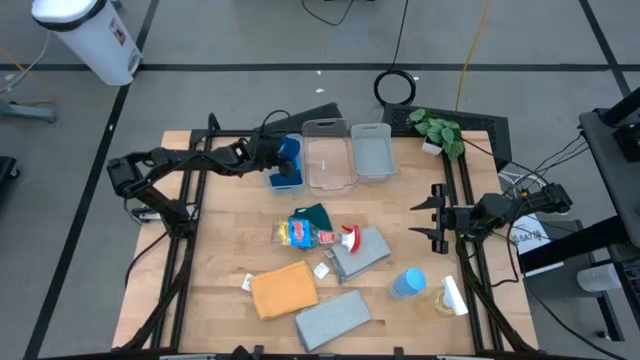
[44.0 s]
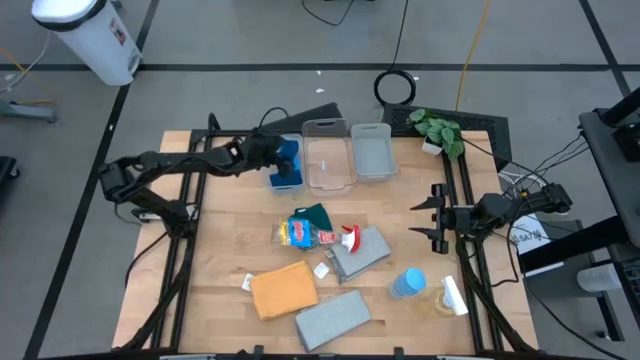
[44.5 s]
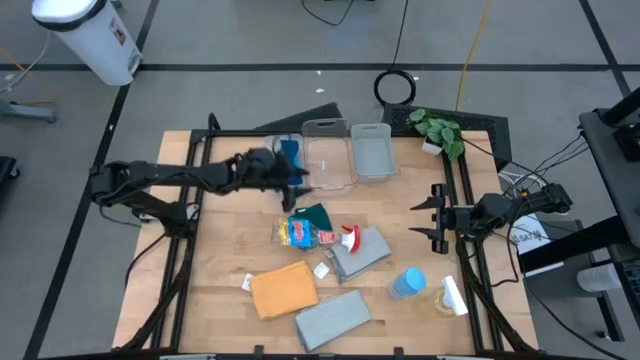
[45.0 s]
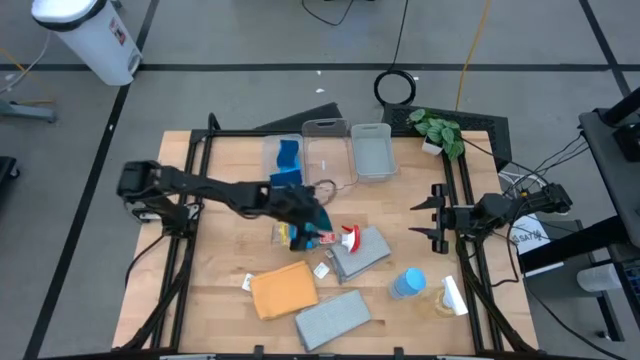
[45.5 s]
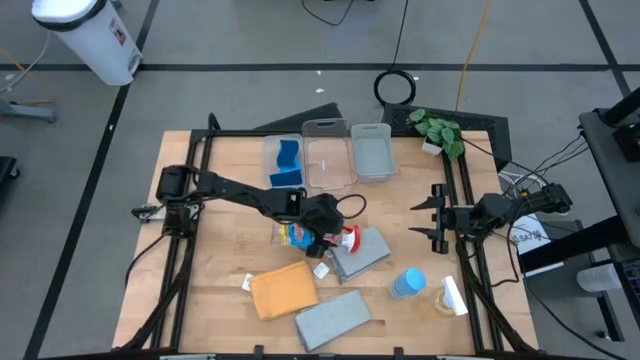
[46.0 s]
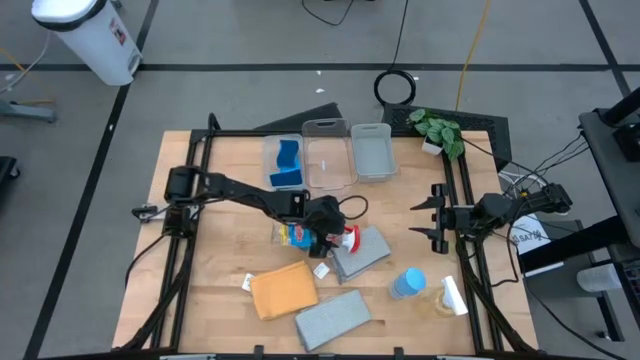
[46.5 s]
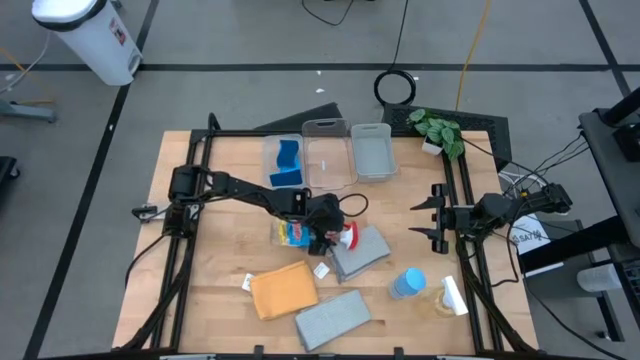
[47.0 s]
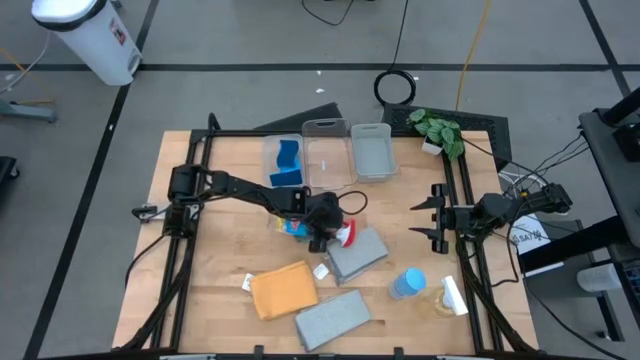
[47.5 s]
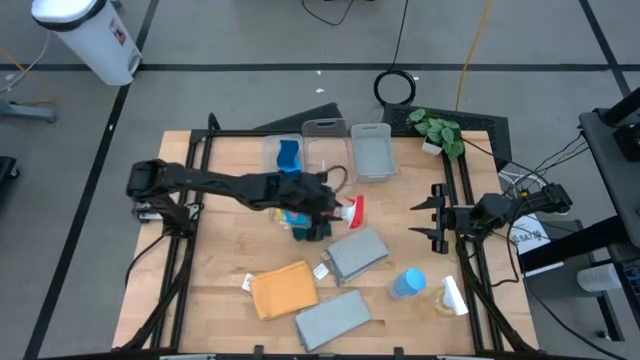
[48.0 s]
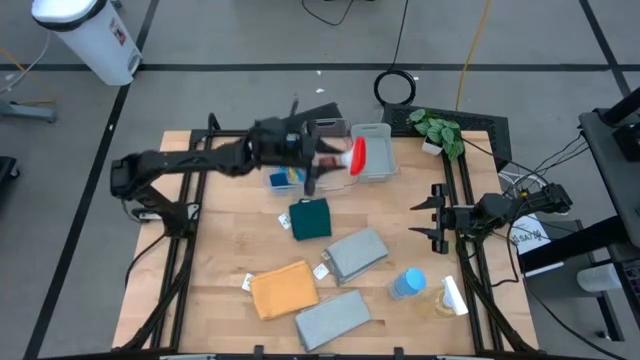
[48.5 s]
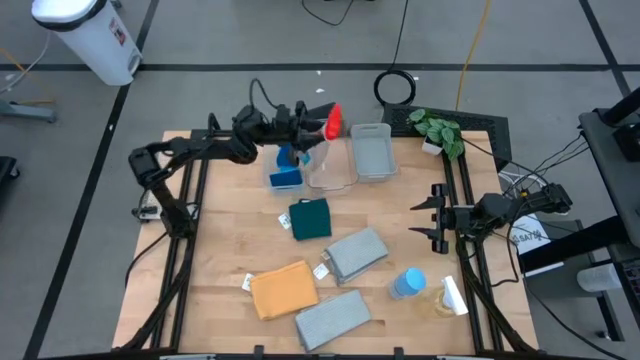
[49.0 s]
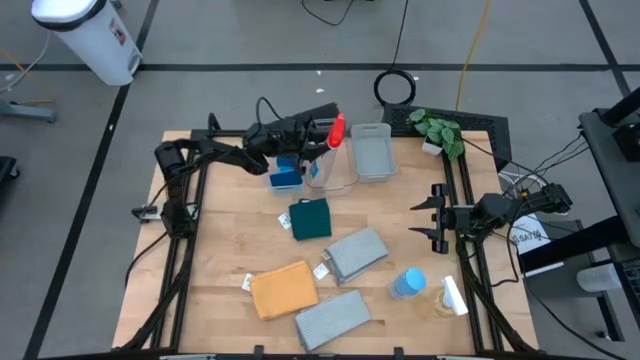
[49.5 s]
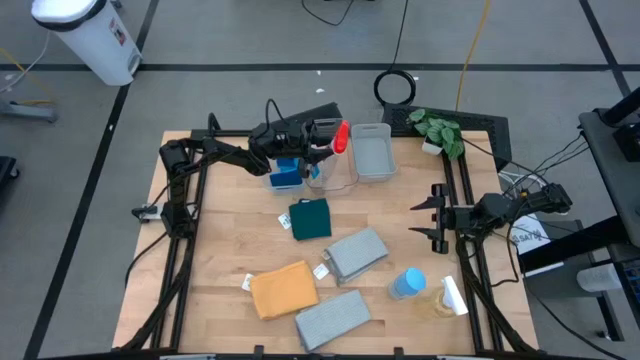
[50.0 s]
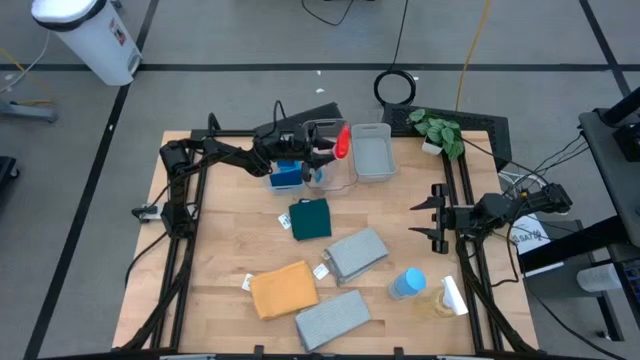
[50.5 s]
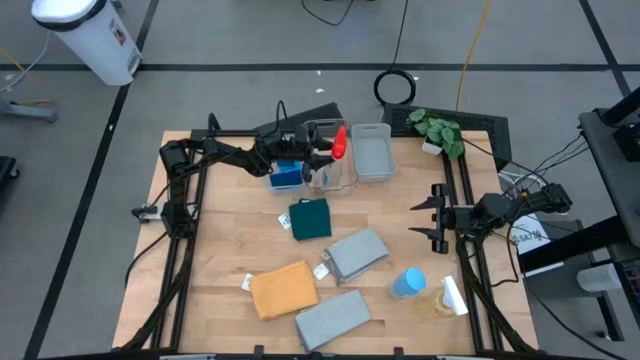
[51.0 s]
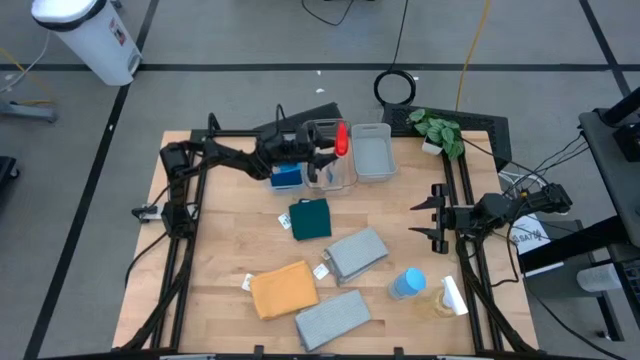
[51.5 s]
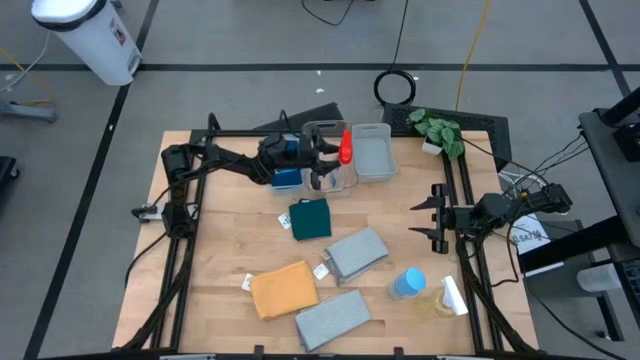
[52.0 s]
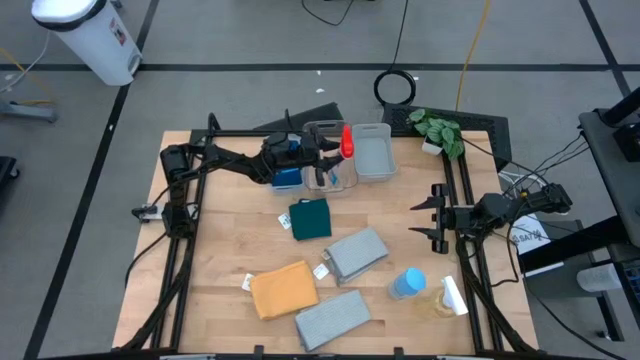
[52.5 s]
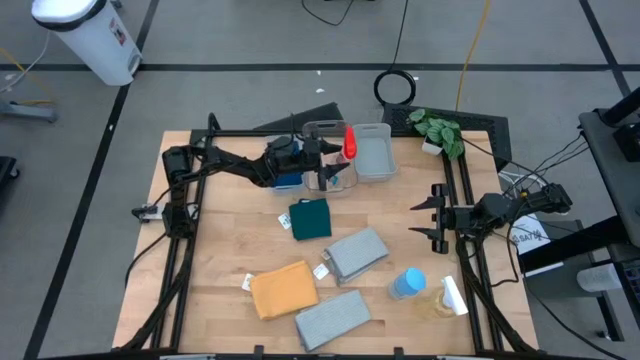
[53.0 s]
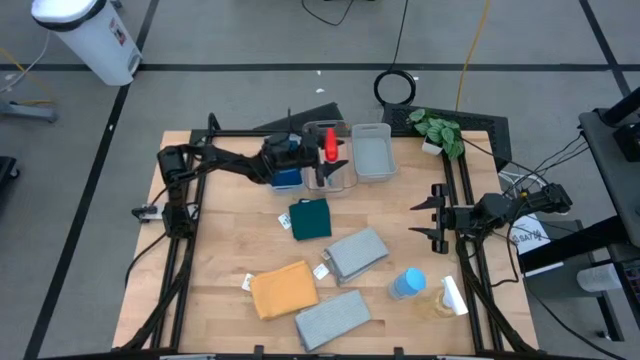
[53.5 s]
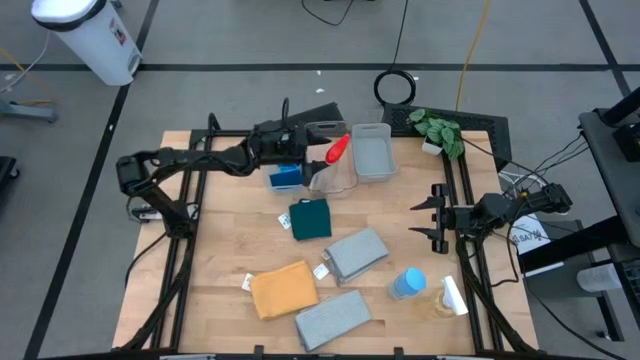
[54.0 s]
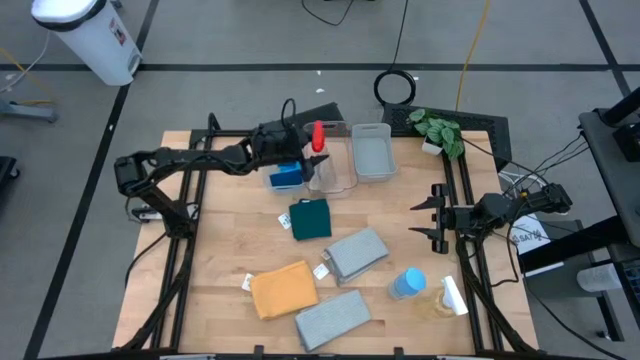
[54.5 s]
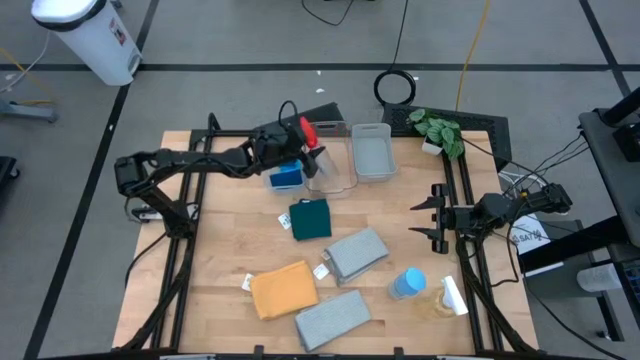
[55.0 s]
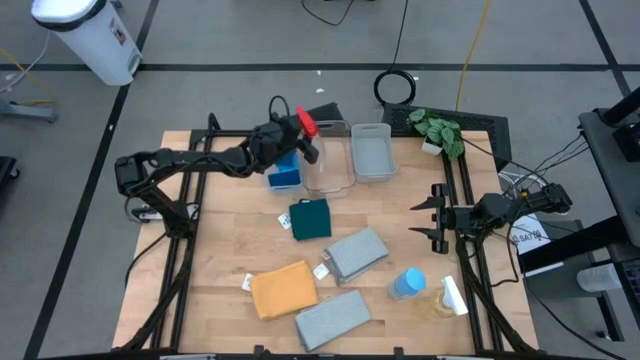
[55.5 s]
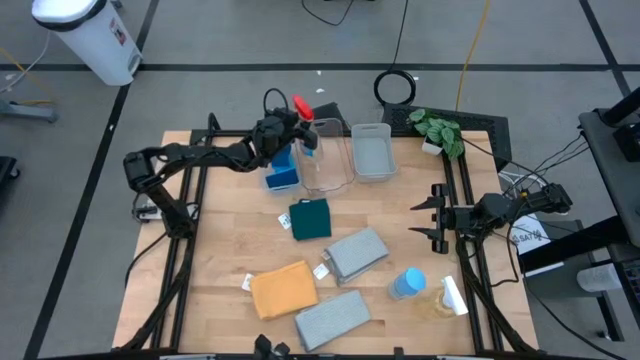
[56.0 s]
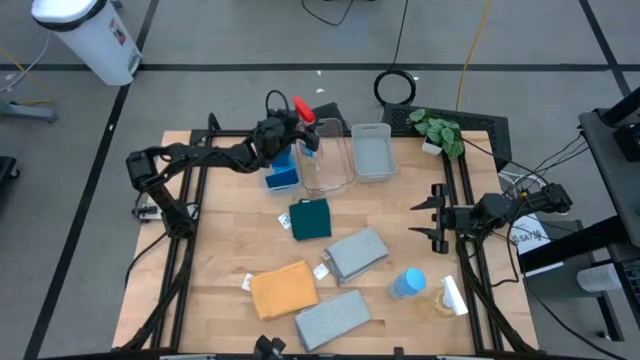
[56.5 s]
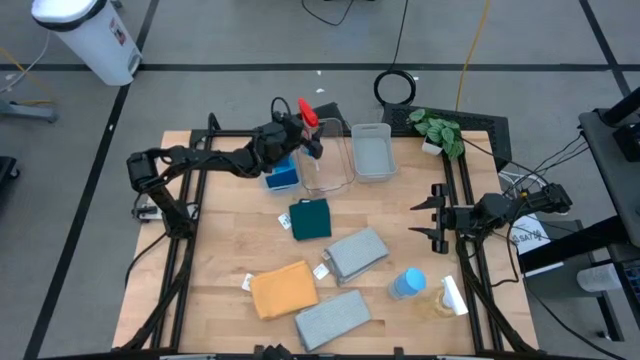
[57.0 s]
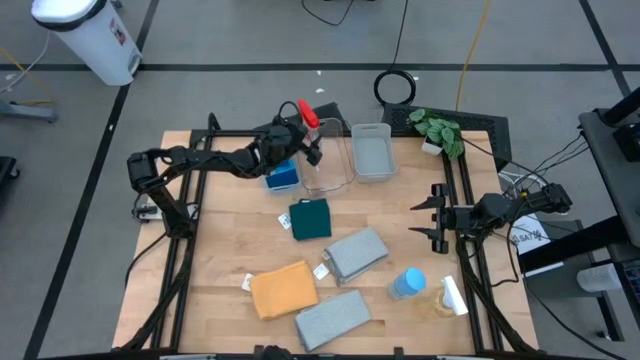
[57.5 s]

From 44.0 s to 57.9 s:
Task: Pick & Place Kitchen Items
Put the red disinfectant spray bottle into the transparent bin

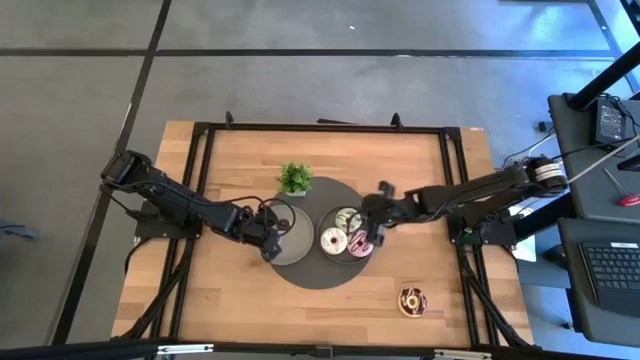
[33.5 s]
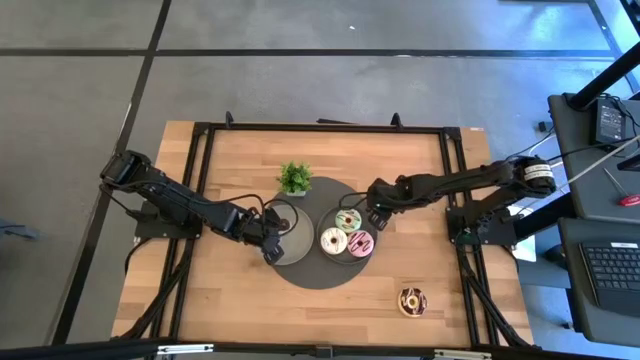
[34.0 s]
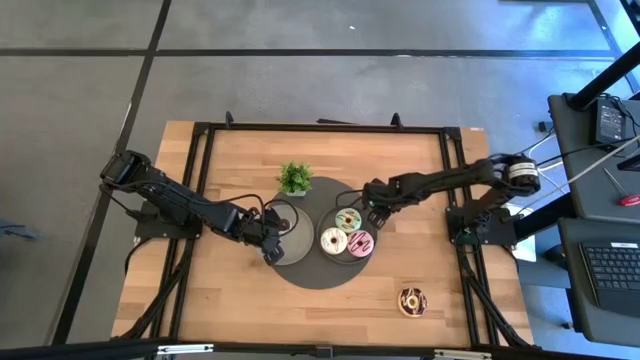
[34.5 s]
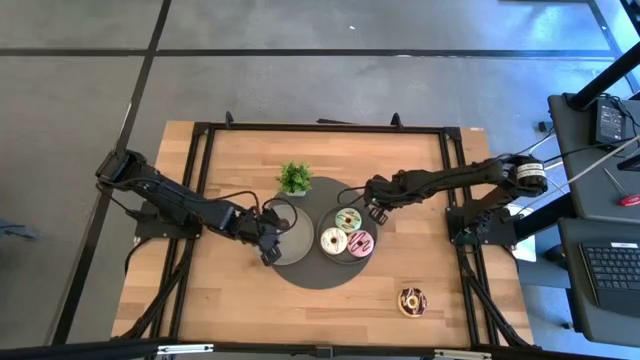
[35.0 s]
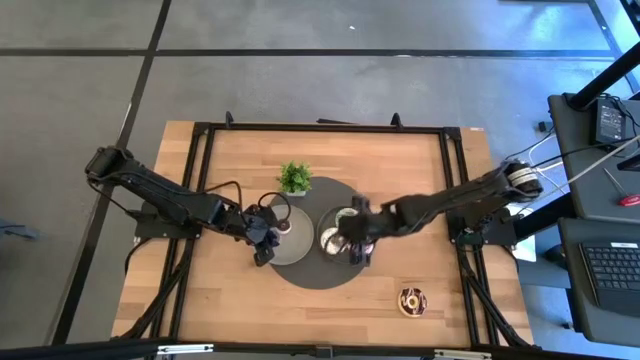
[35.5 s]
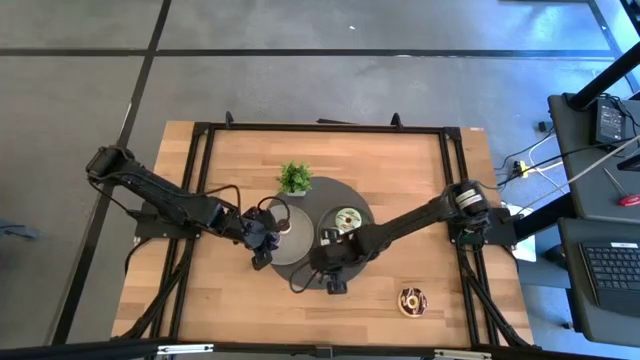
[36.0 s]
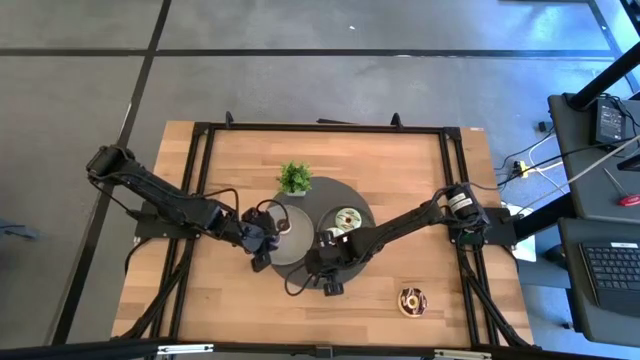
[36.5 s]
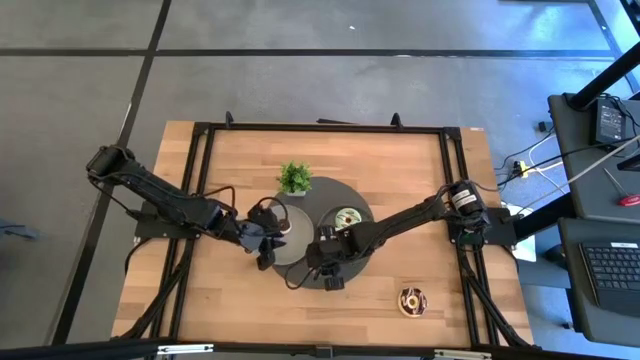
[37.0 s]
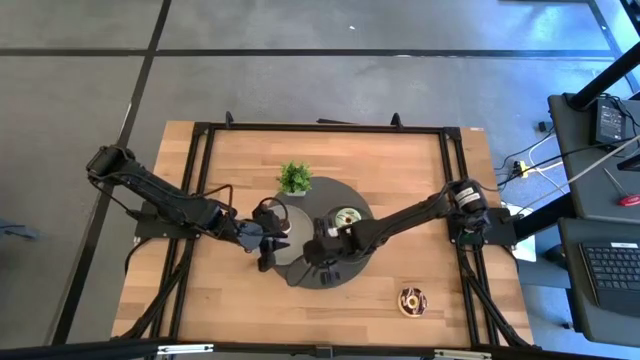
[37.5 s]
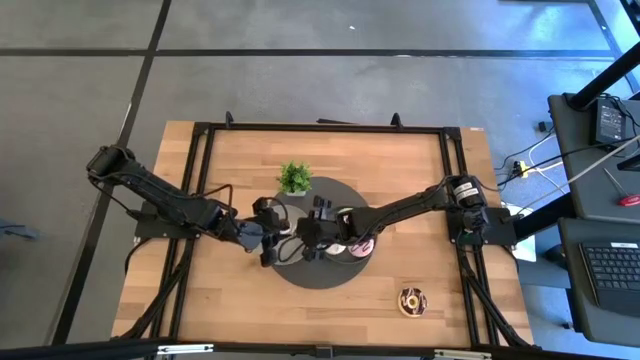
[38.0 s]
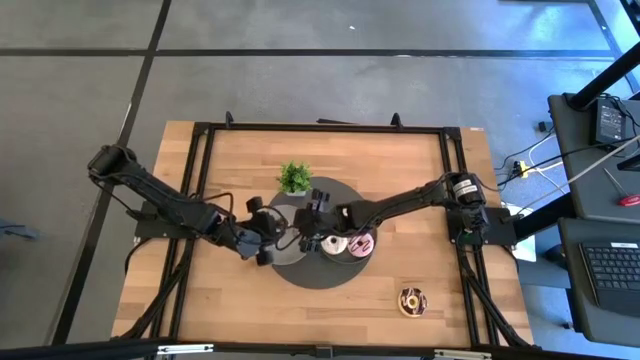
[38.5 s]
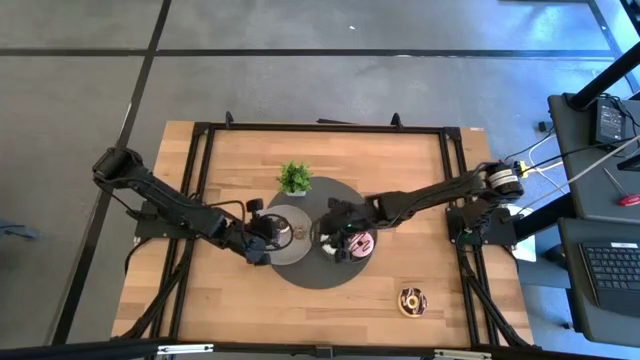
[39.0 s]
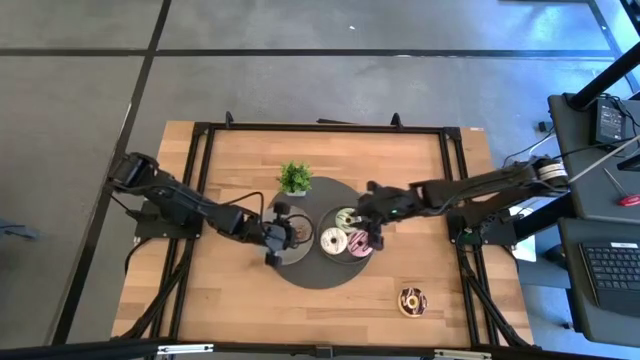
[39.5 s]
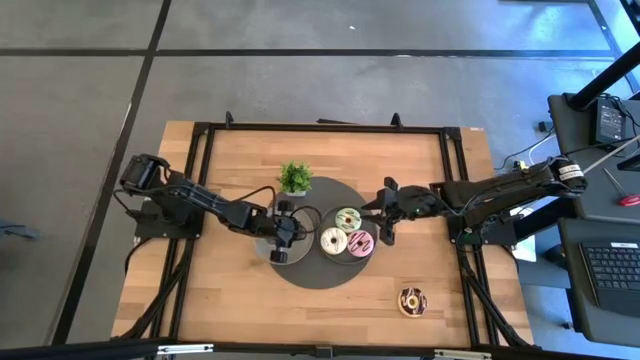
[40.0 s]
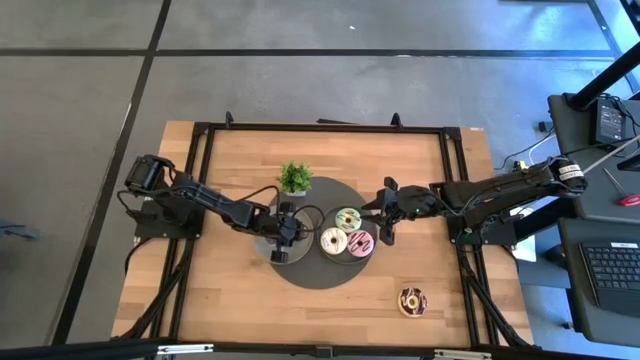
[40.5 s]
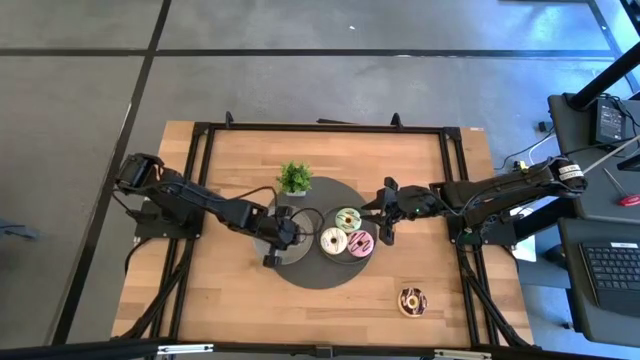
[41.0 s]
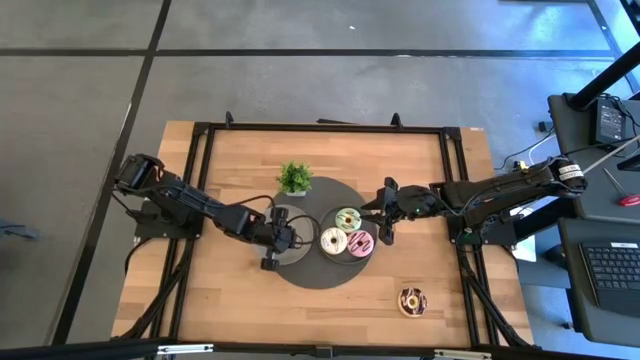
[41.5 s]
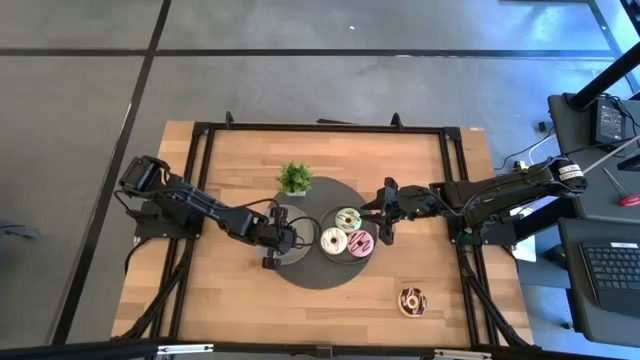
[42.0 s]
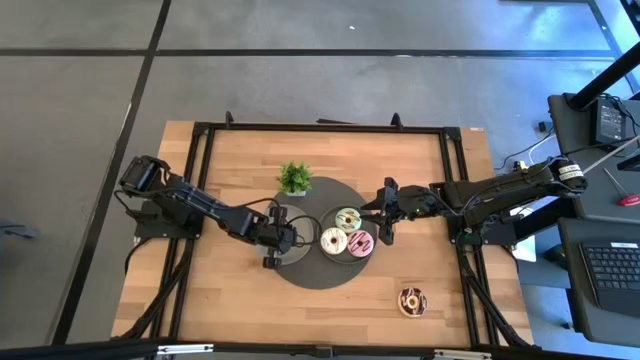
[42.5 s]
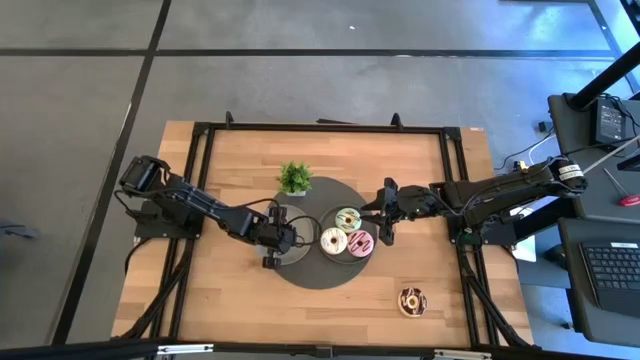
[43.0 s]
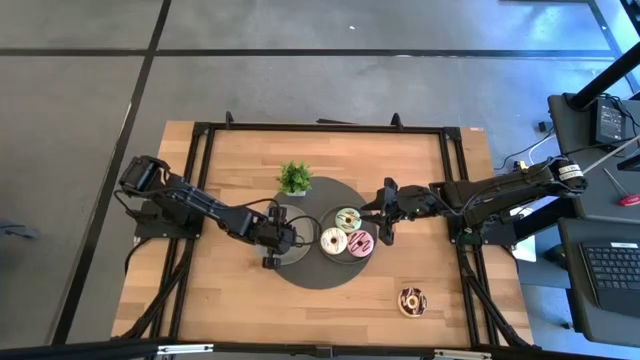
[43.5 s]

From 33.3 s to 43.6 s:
Task: Pick & Place donuts
Put the small brown donut on the gray plate
